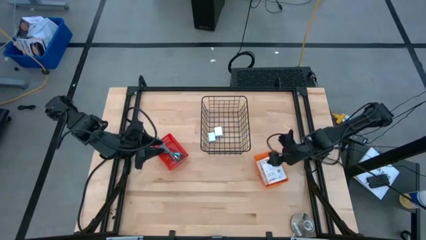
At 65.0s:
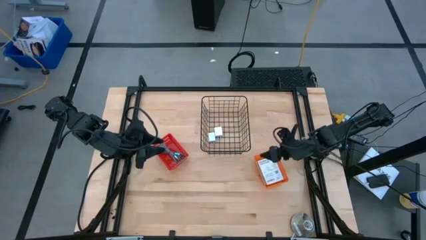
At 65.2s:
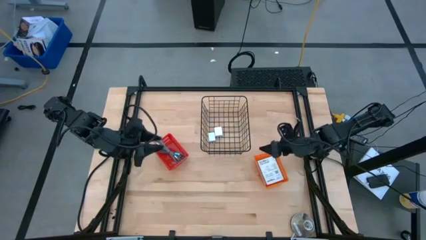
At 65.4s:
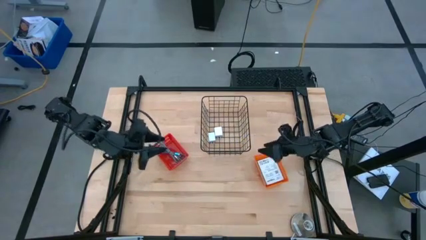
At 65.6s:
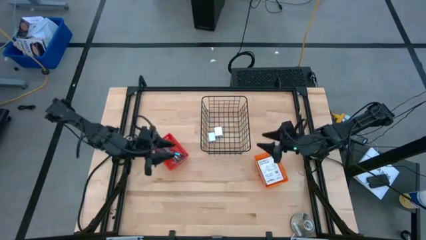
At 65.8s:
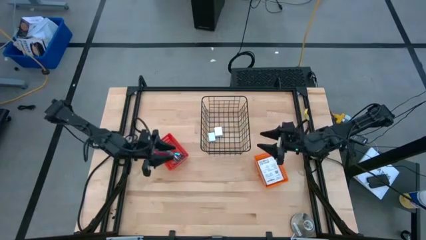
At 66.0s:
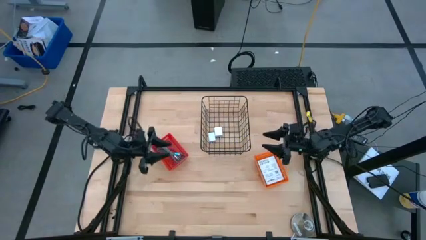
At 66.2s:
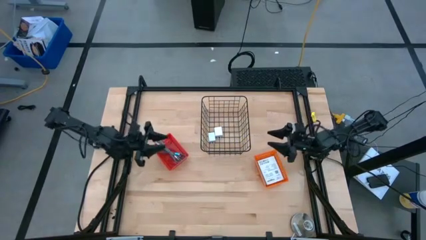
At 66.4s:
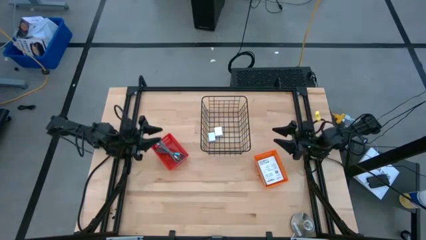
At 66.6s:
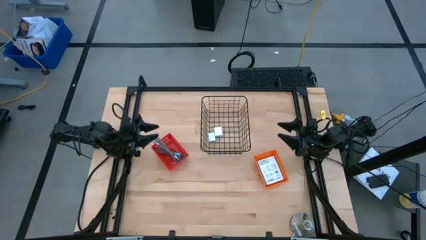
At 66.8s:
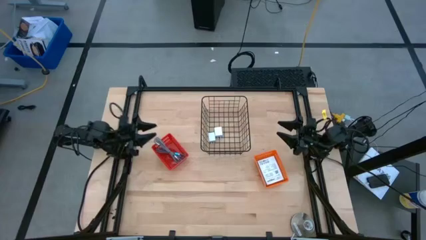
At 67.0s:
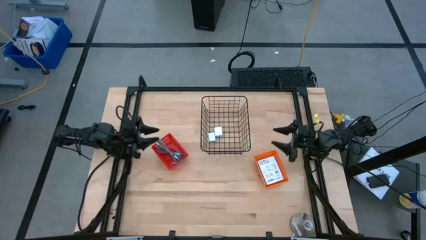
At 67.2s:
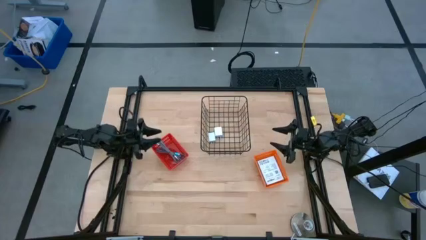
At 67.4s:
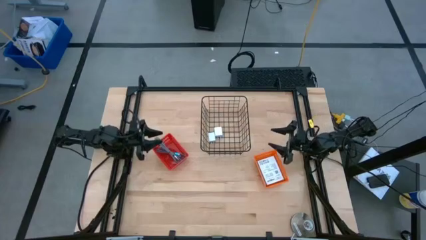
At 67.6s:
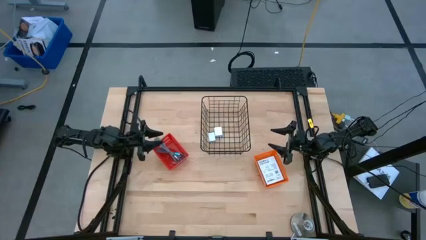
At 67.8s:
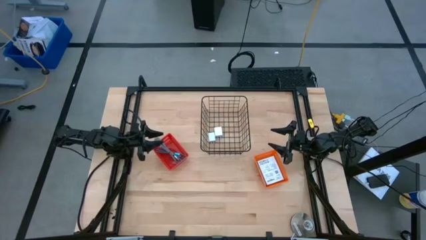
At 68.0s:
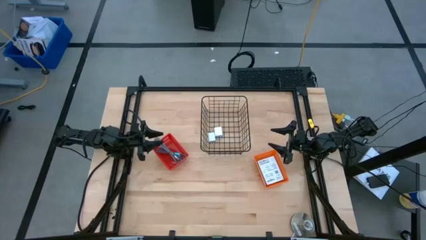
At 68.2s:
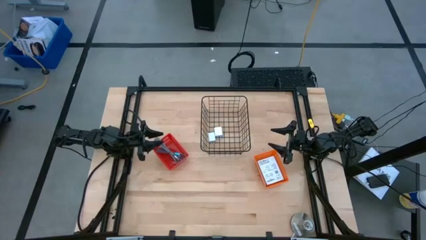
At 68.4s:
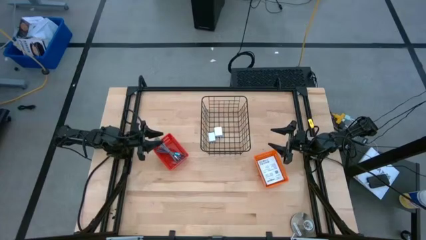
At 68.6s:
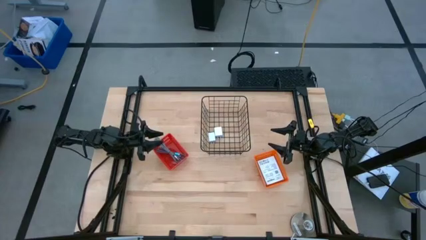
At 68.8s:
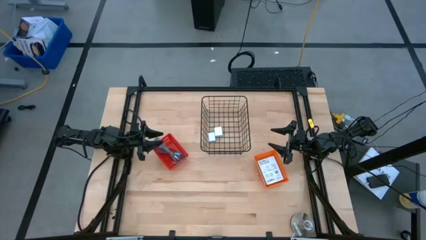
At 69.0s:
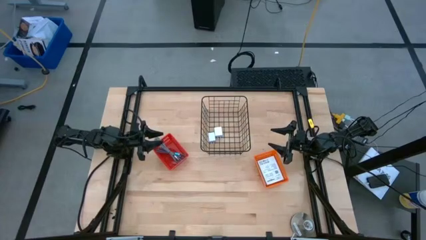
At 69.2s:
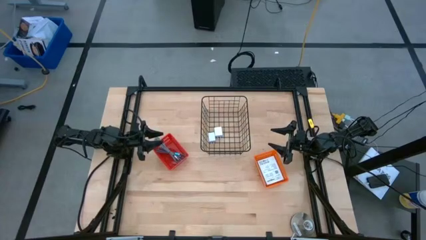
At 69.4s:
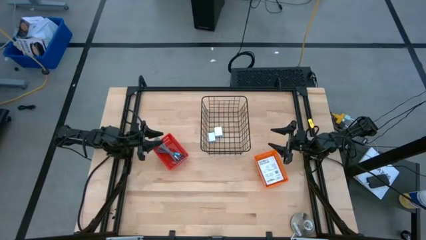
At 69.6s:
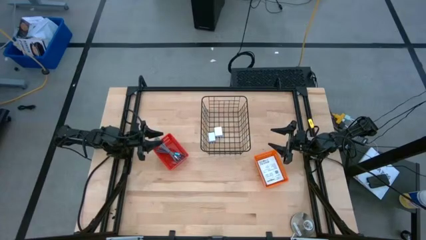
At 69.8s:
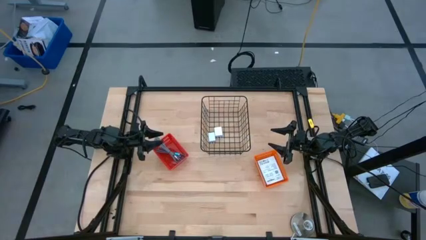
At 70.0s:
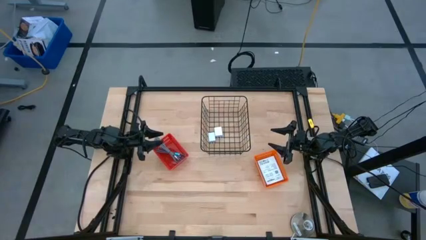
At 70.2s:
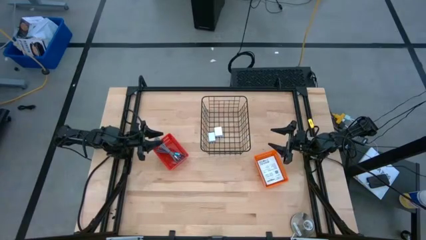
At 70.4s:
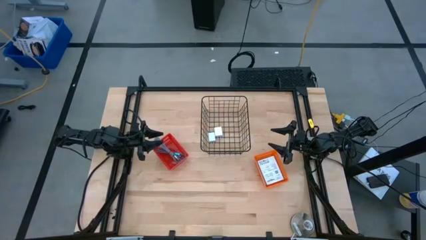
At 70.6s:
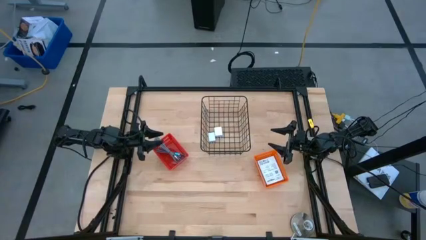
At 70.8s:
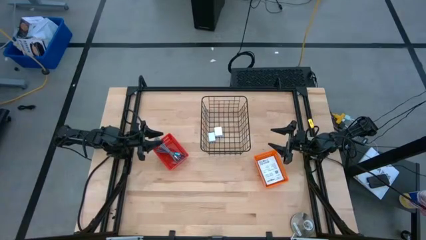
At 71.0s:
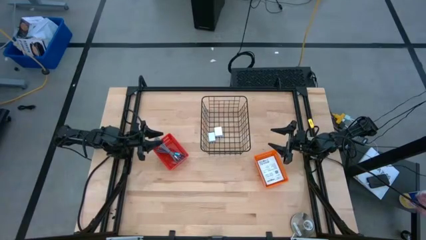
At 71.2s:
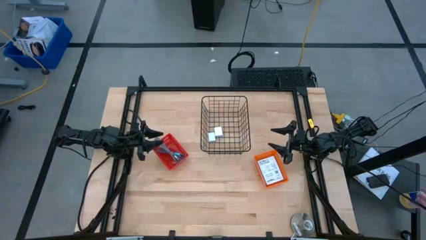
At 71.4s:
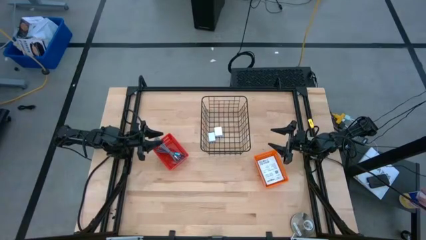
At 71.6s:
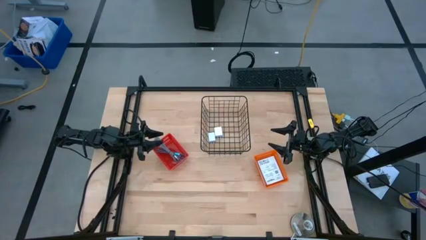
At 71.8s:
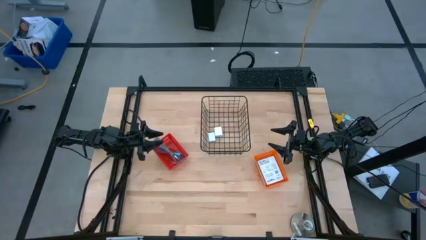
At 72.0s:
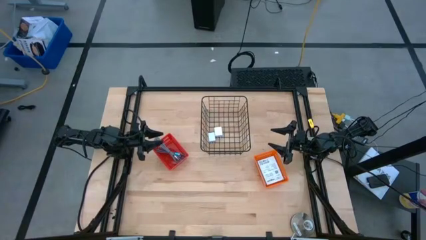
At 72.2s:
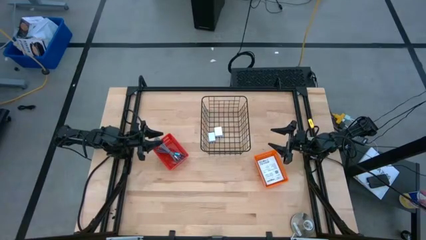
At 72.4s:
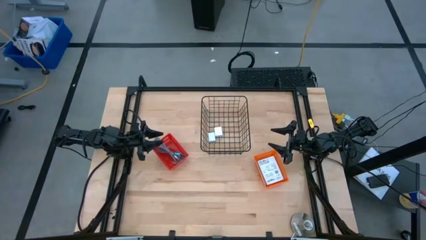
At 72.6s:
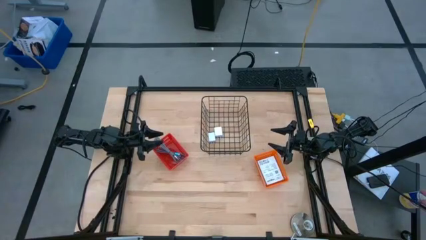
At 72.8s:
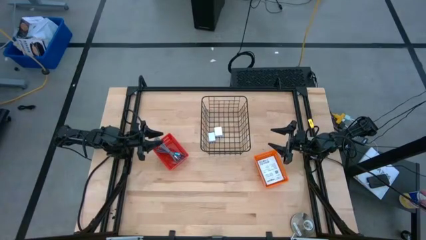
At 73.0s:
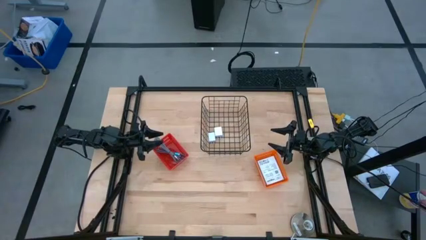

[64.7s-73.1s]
Task: Pick and place items into bin
Return to Home Position

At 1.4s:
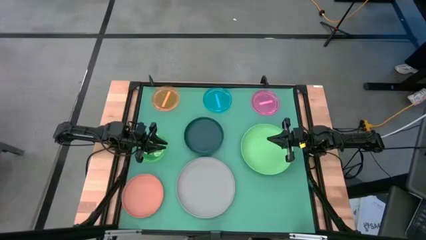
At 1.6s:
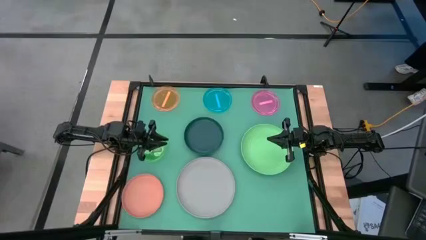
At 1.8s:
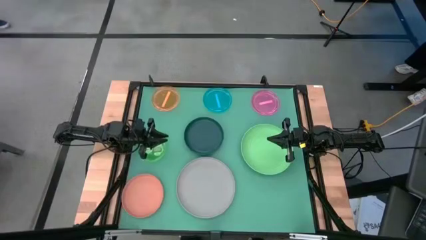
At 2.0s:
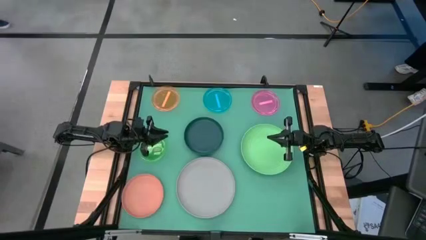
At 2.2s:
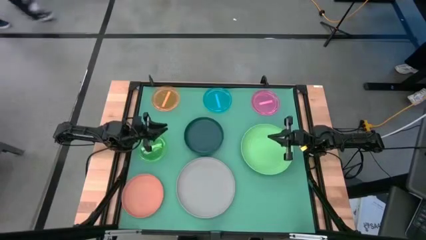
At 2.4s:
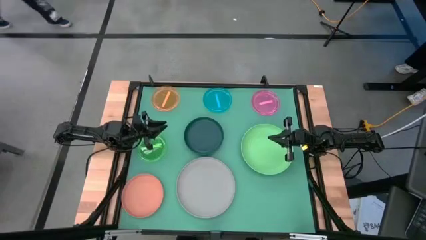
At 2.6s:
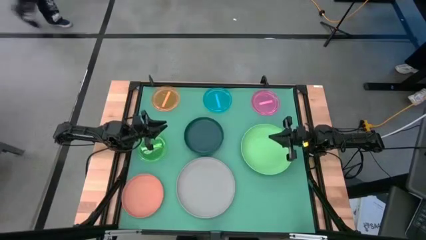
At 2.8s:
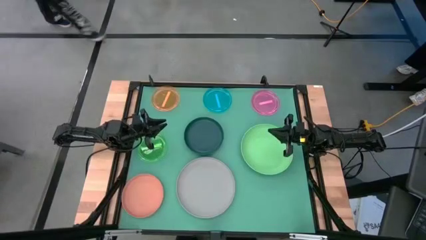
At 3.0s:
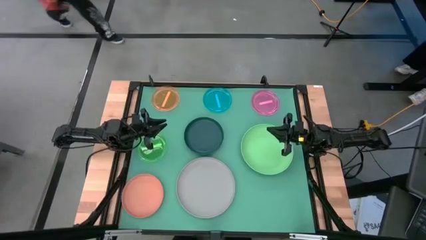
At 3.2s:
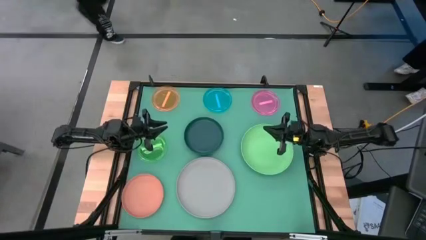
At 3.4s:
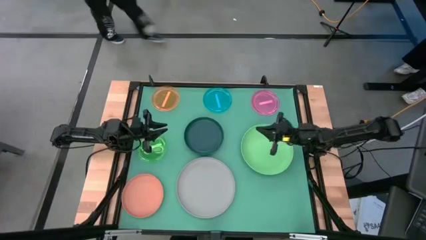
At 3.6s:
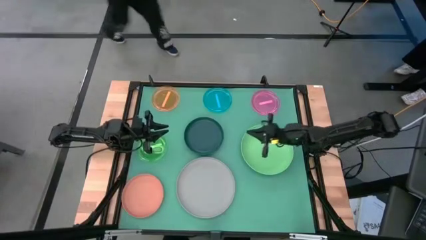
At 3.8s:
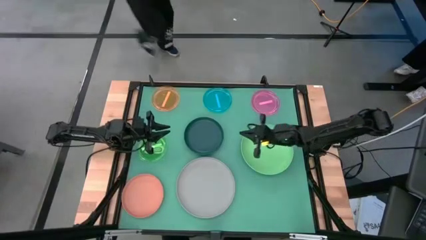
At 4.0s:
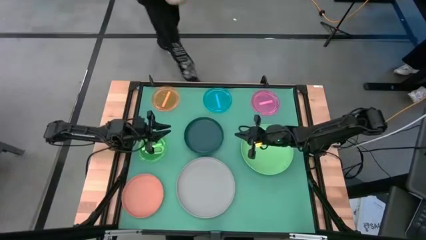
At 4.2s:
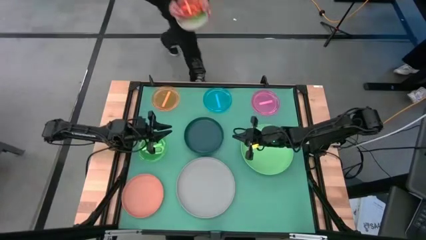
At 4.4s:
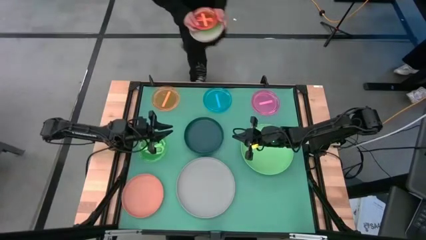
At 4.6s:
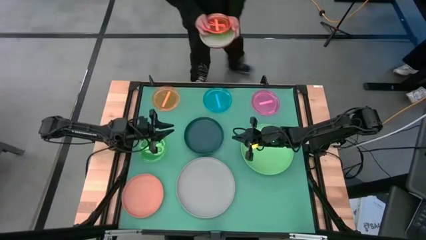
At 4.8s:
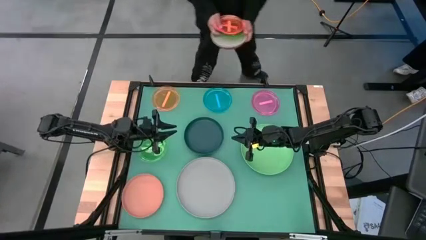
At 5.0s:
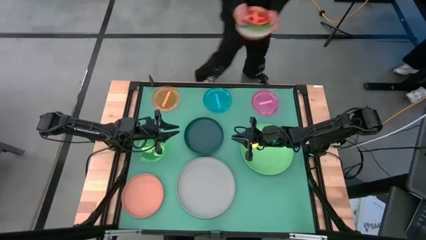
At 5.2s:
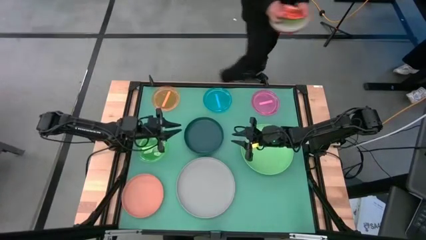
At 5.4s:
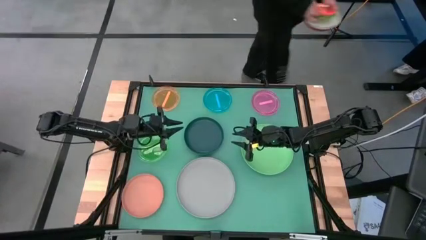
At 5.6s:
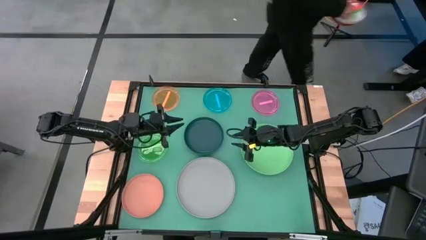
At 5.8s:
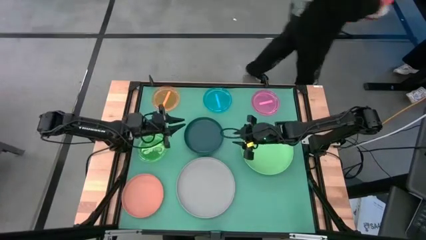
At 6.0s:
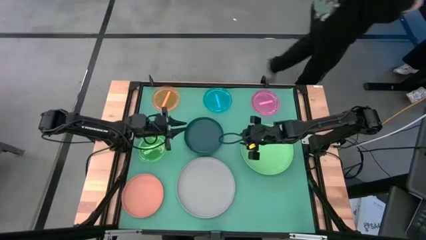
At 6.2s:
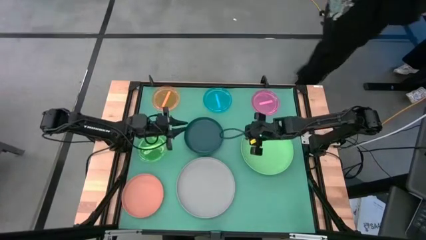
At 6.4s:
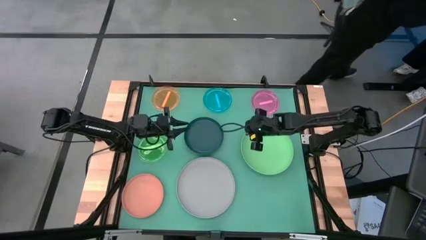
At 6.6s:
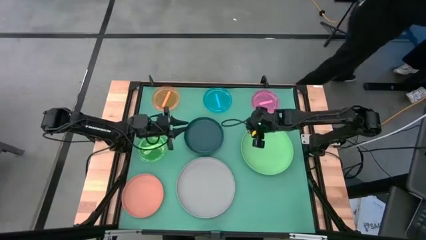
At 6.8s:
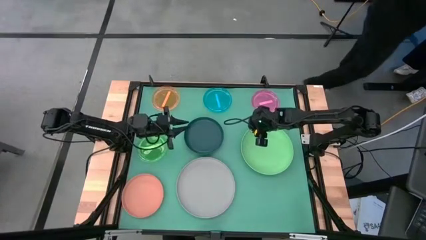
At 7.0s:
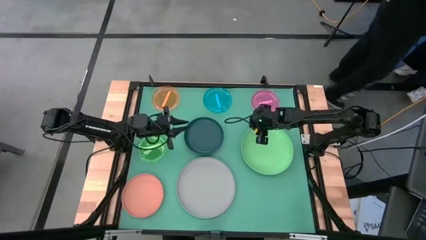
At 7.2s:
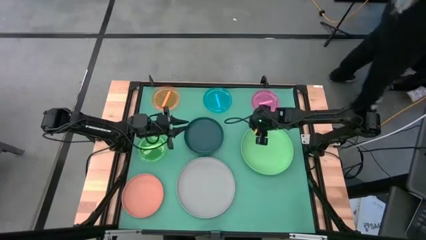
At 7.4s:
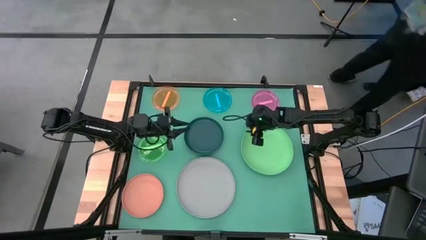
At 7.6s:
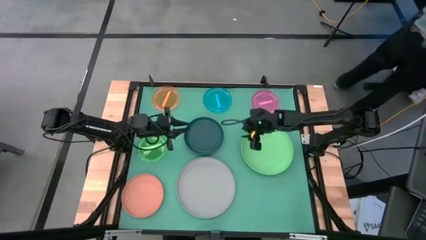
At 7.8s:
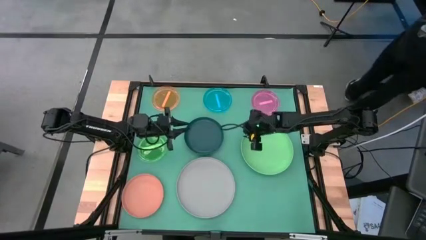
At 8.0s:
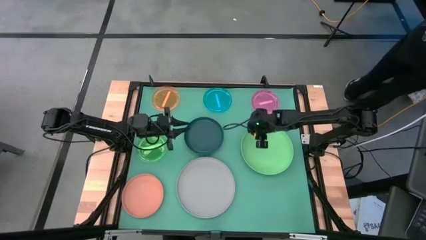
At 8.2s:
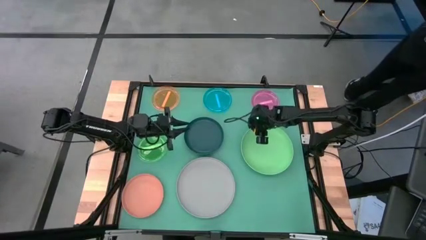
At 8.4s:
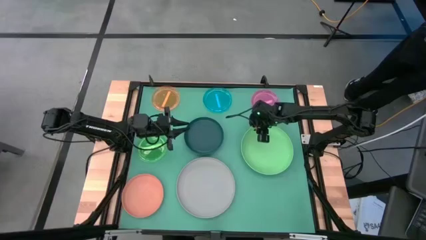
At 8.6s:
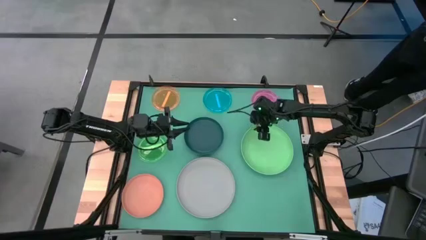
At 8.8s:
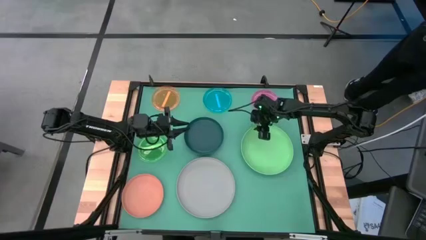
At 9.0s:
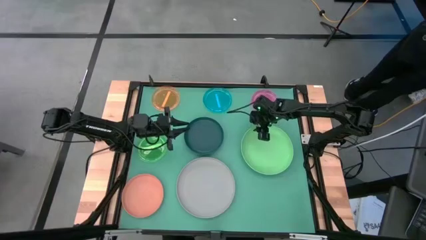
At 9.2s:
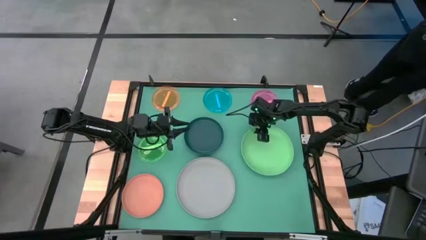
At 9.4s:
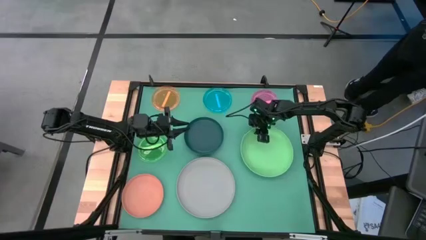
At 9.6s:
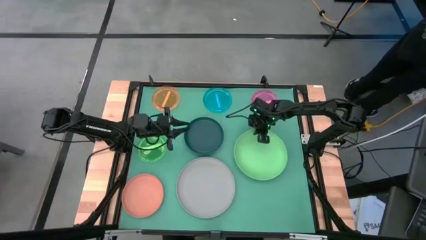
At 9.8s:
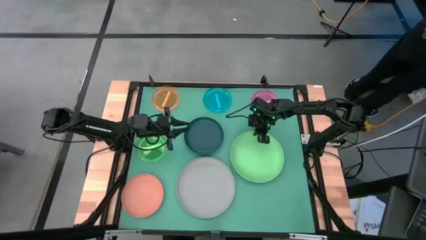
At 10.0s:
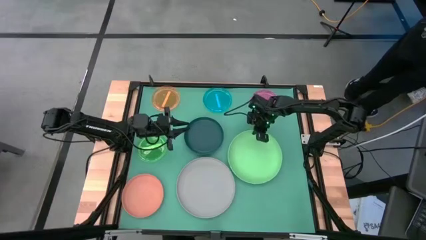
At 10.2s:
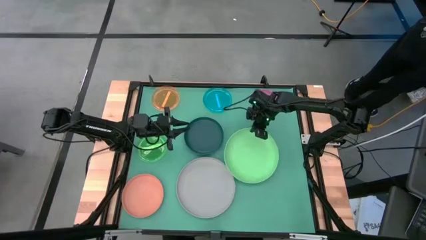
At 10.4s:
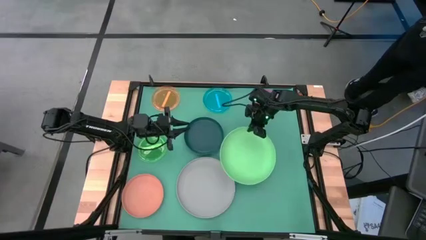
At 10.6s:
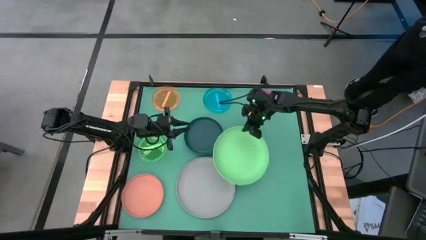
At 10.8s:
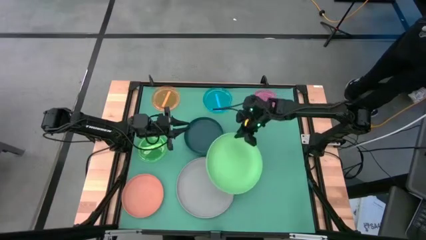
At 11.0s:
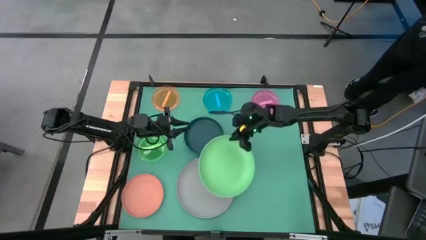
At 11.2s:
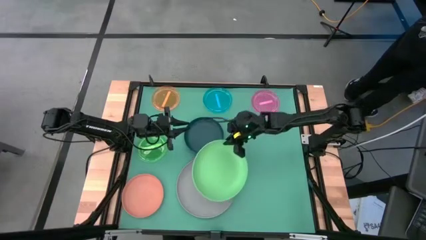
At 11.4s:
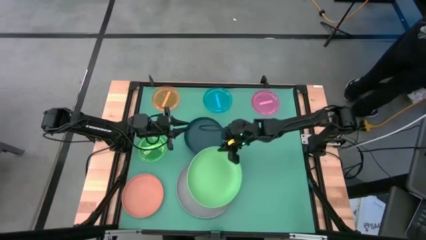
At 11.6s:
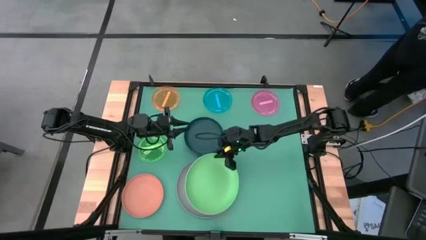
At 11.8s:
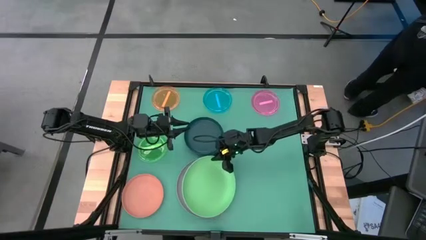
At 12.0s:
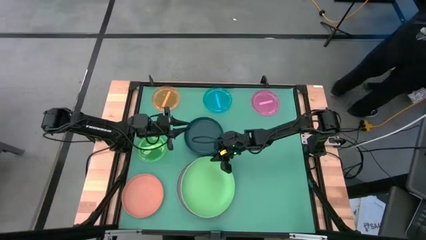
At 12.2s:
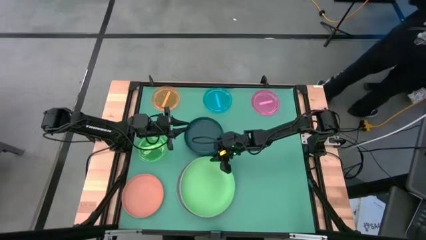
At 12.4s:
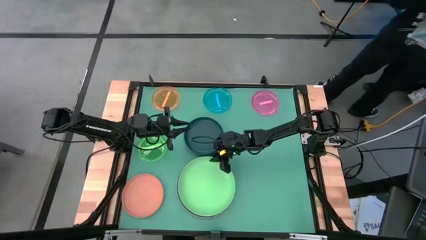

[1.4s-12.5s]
Task: Stack plastic plates
Stack the green plate on top of the gray plate
